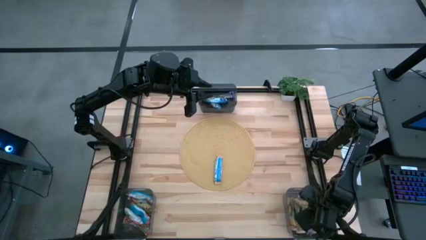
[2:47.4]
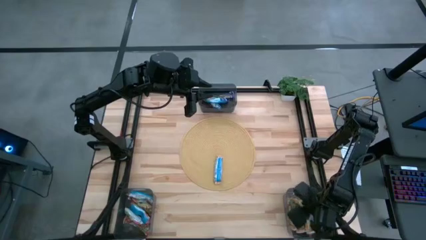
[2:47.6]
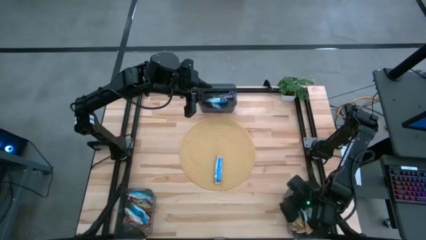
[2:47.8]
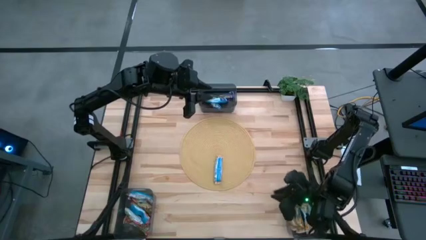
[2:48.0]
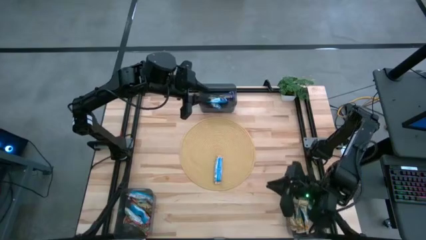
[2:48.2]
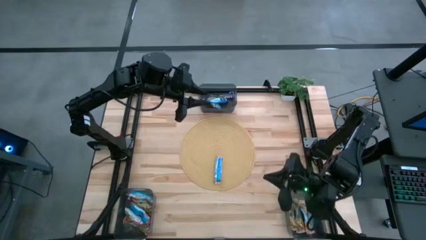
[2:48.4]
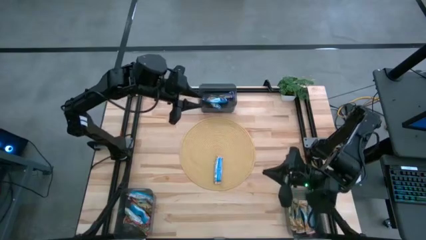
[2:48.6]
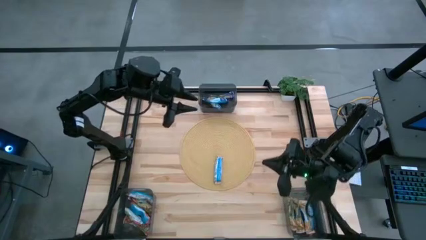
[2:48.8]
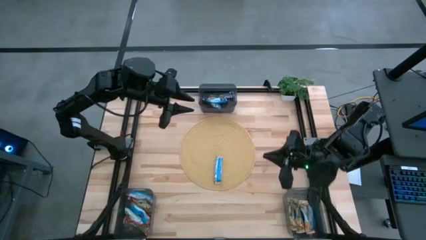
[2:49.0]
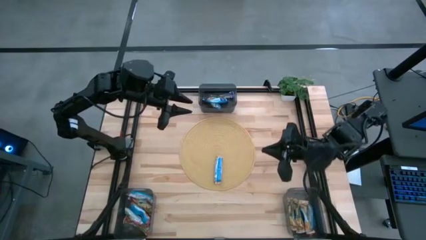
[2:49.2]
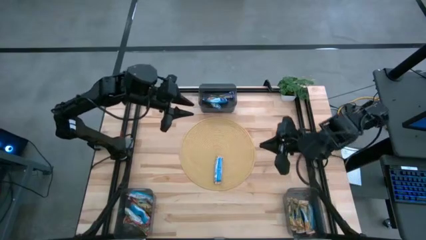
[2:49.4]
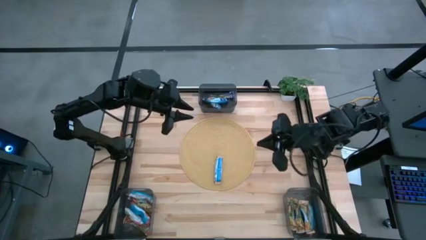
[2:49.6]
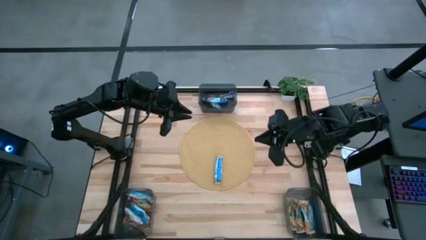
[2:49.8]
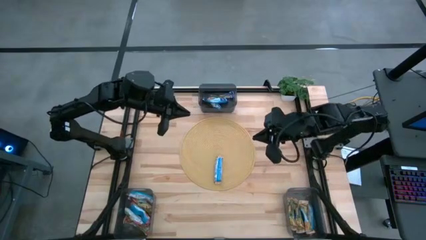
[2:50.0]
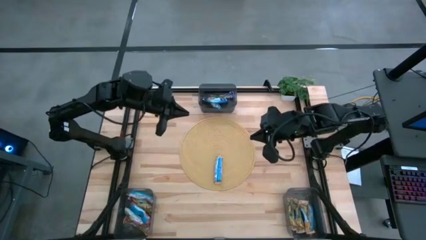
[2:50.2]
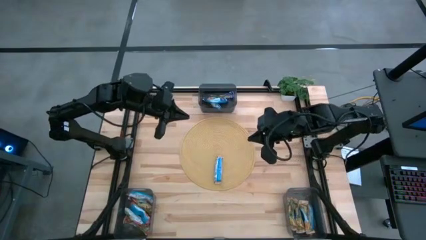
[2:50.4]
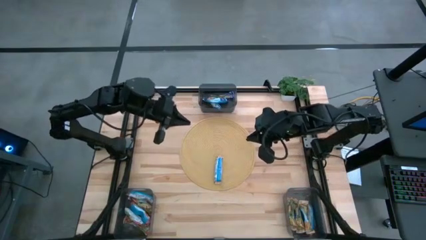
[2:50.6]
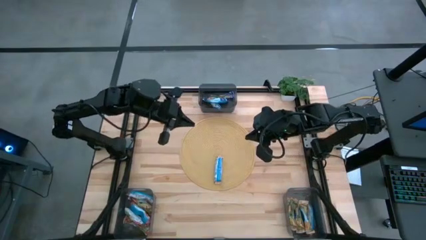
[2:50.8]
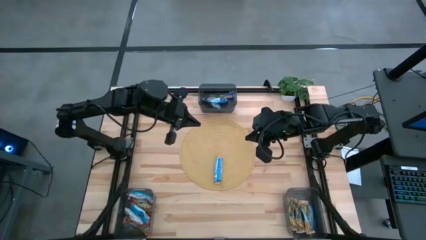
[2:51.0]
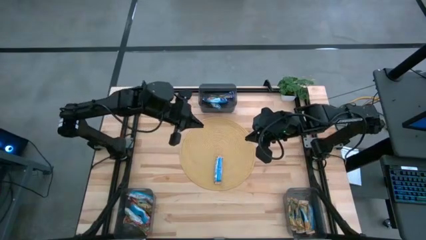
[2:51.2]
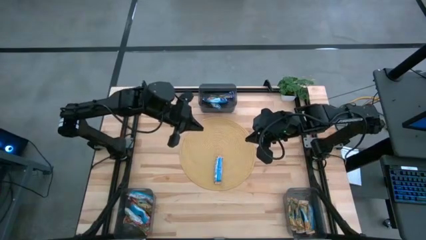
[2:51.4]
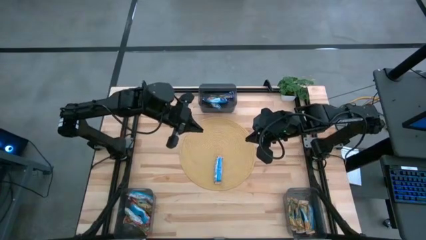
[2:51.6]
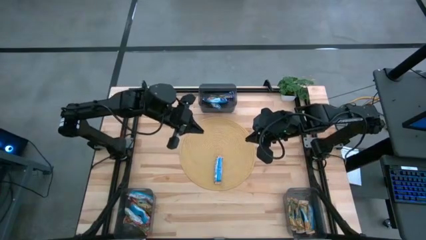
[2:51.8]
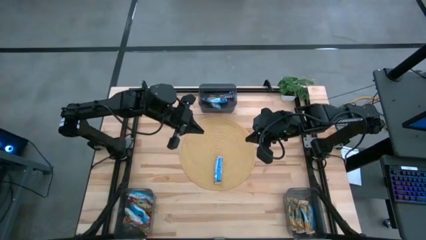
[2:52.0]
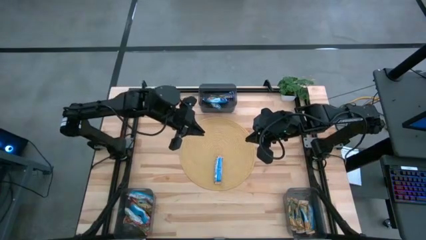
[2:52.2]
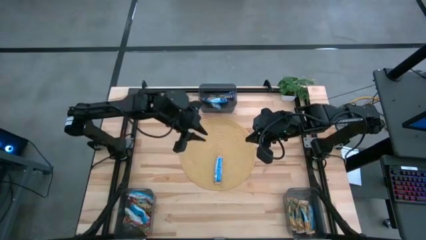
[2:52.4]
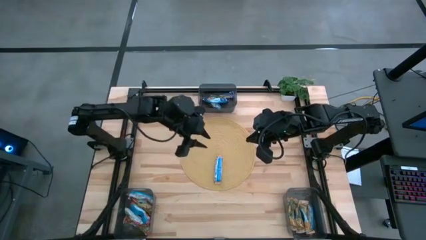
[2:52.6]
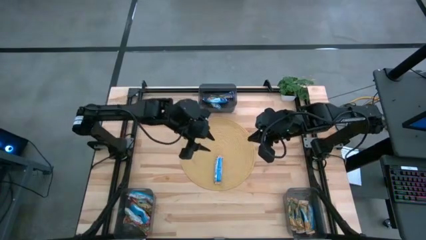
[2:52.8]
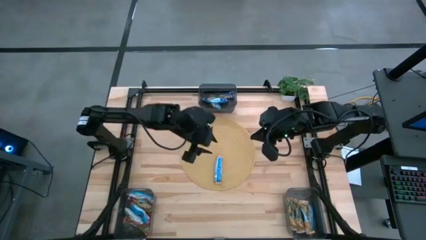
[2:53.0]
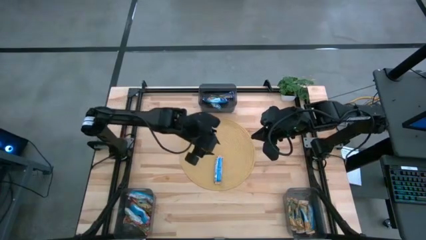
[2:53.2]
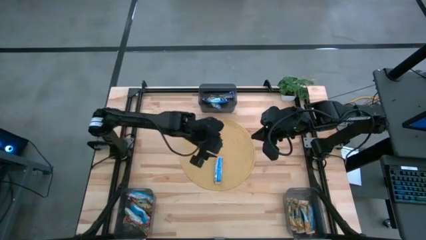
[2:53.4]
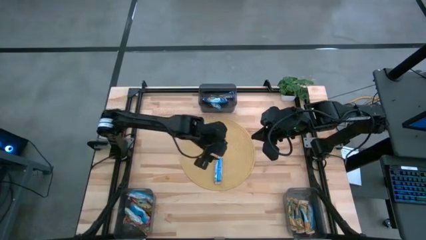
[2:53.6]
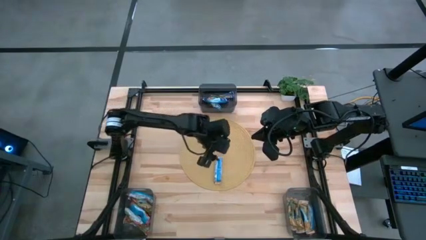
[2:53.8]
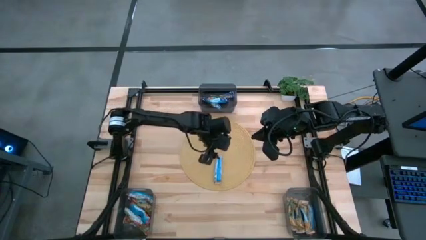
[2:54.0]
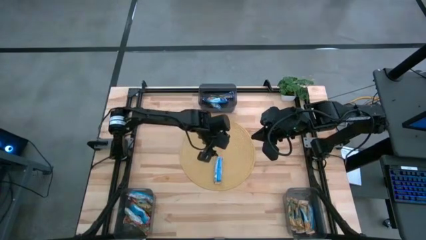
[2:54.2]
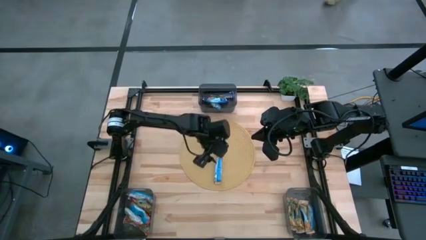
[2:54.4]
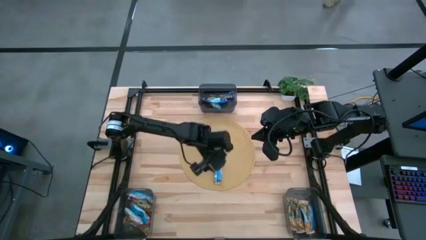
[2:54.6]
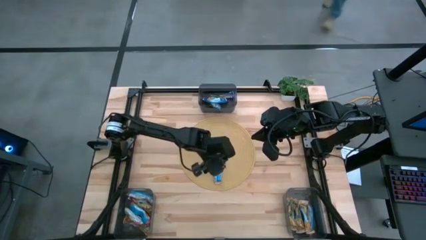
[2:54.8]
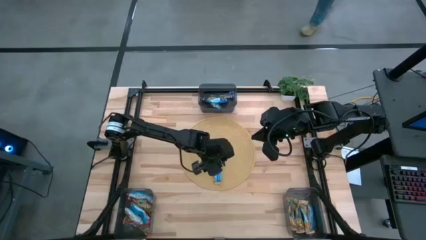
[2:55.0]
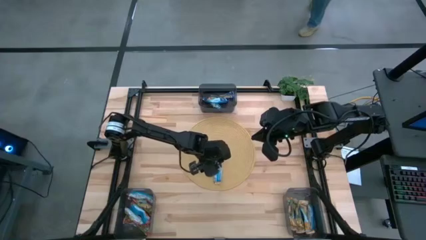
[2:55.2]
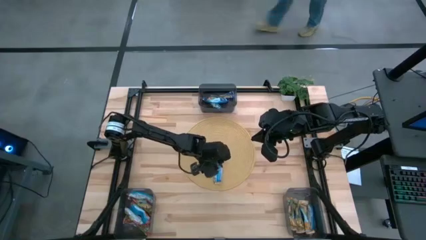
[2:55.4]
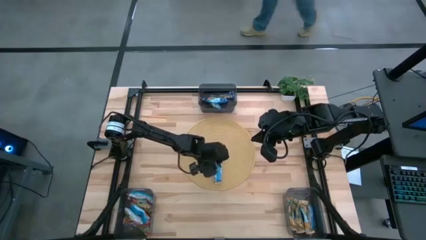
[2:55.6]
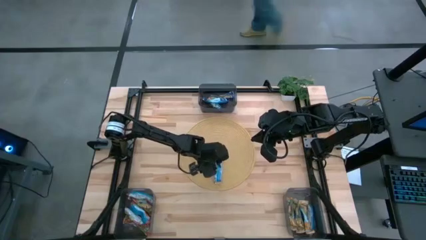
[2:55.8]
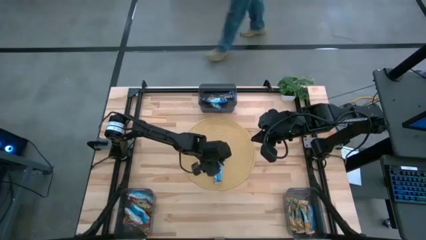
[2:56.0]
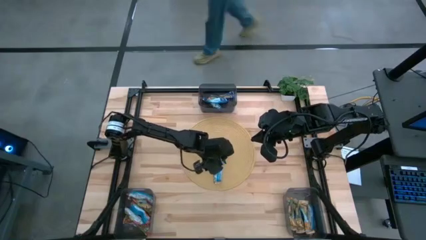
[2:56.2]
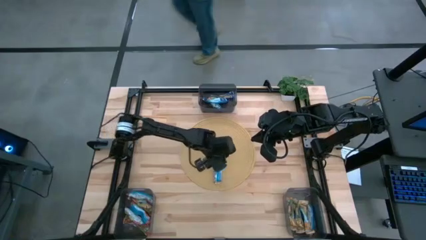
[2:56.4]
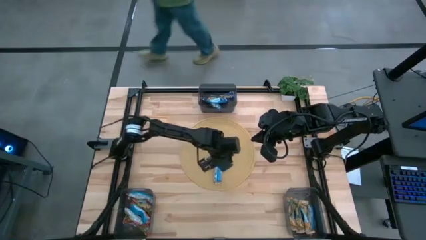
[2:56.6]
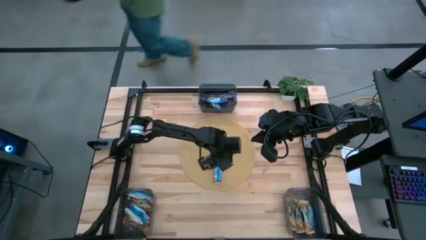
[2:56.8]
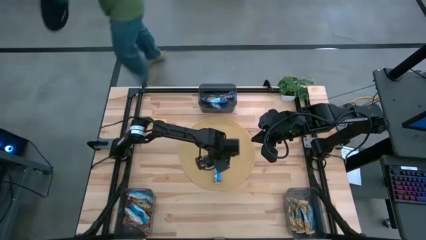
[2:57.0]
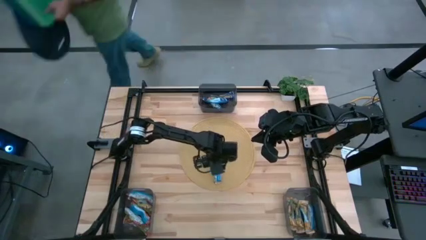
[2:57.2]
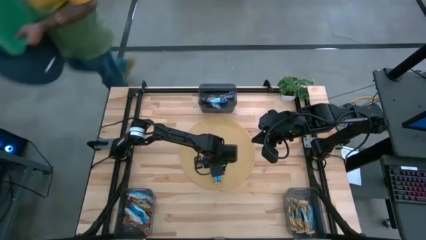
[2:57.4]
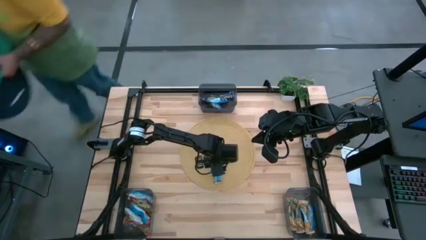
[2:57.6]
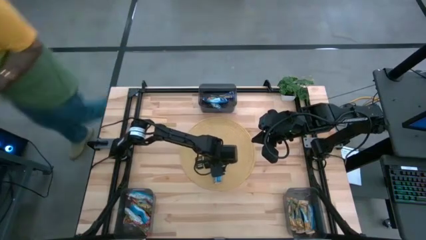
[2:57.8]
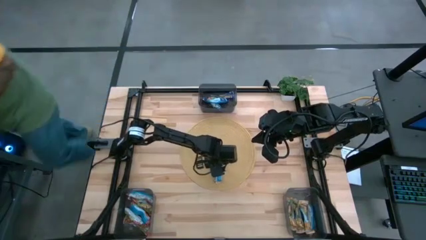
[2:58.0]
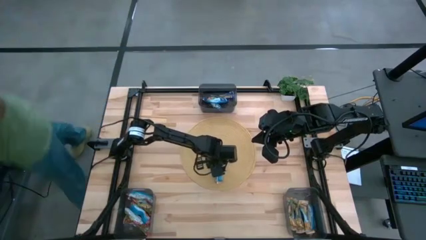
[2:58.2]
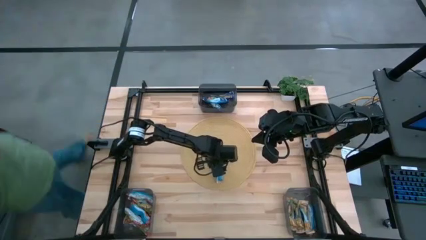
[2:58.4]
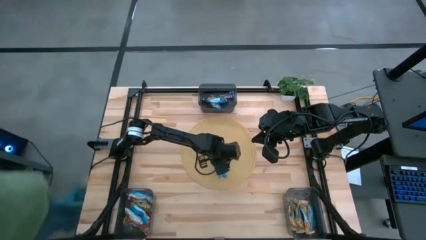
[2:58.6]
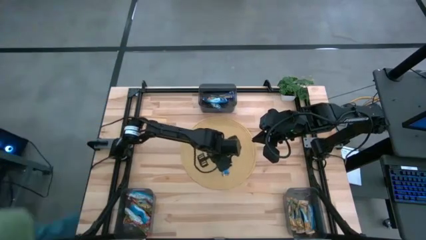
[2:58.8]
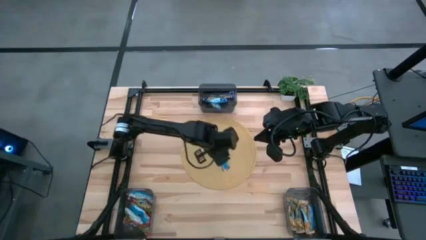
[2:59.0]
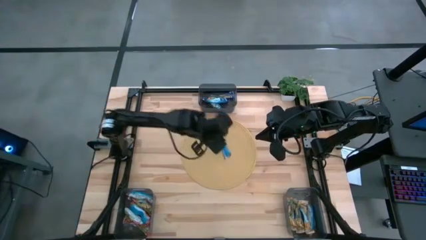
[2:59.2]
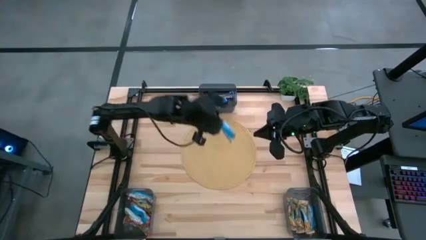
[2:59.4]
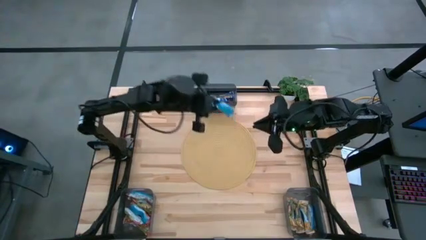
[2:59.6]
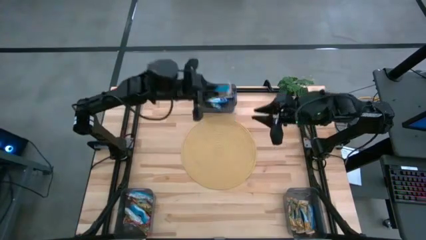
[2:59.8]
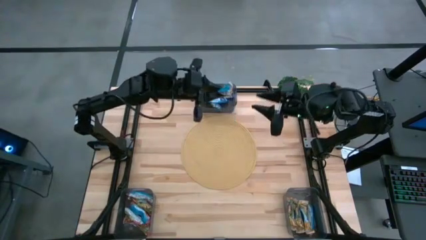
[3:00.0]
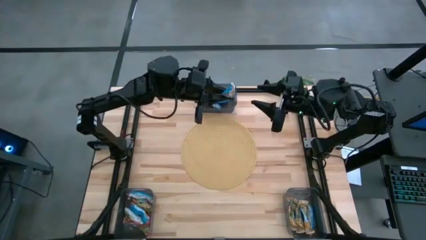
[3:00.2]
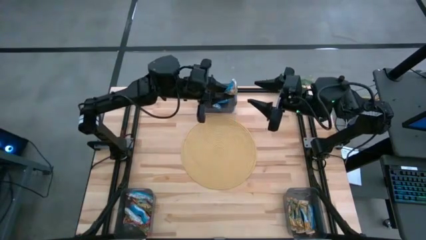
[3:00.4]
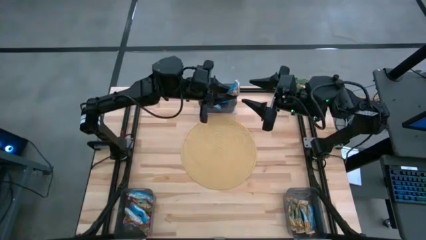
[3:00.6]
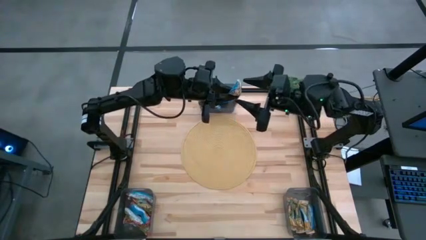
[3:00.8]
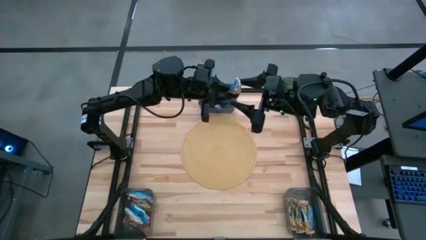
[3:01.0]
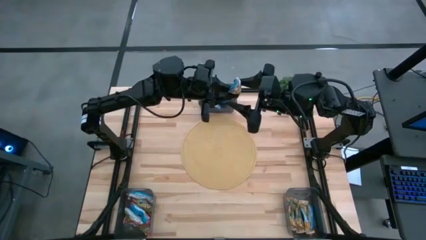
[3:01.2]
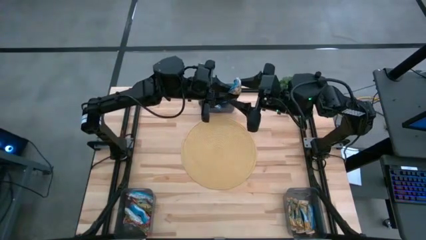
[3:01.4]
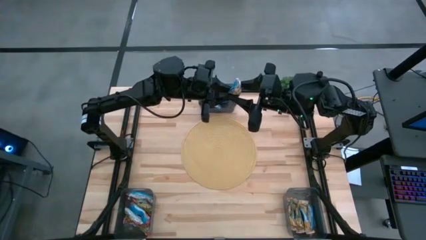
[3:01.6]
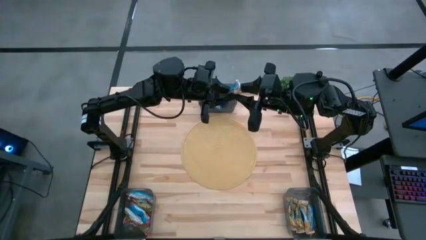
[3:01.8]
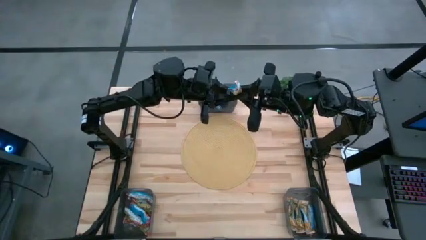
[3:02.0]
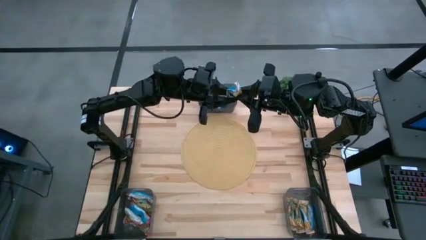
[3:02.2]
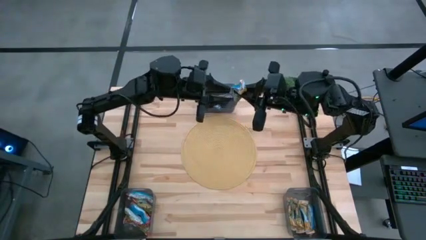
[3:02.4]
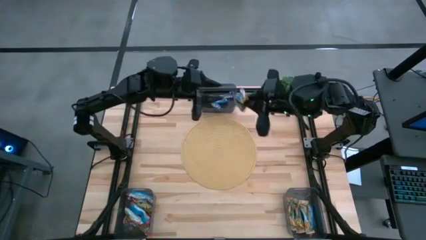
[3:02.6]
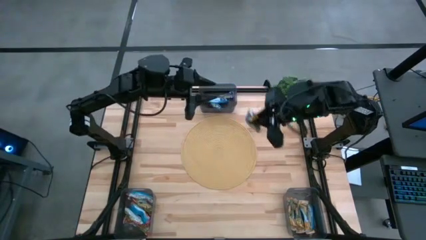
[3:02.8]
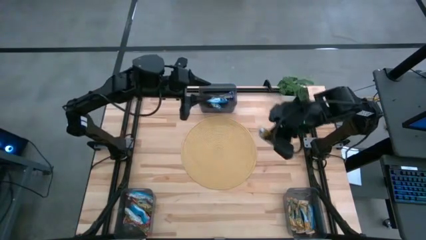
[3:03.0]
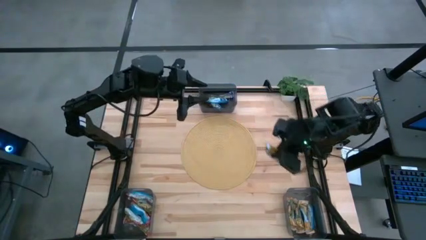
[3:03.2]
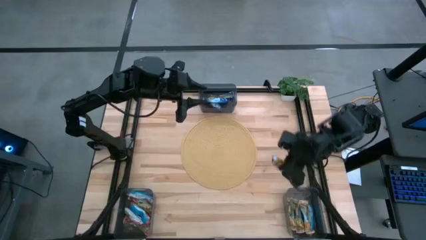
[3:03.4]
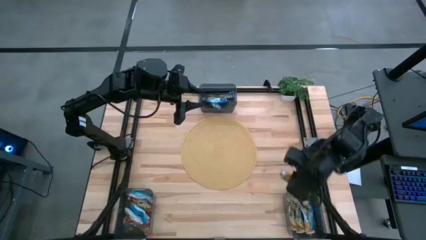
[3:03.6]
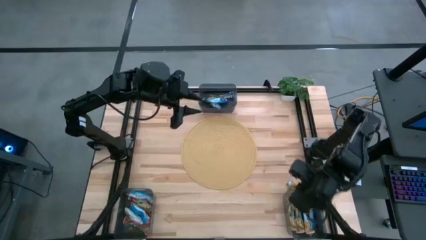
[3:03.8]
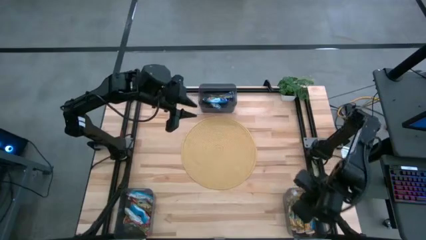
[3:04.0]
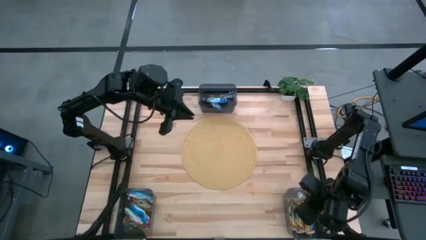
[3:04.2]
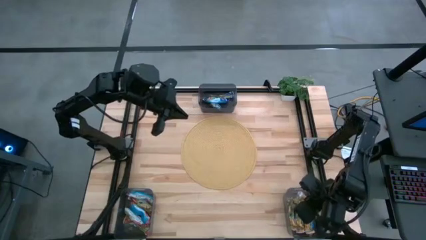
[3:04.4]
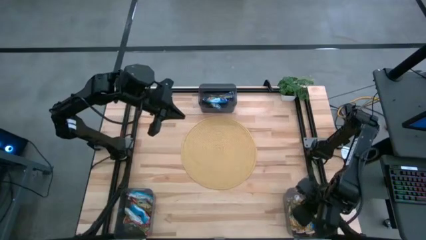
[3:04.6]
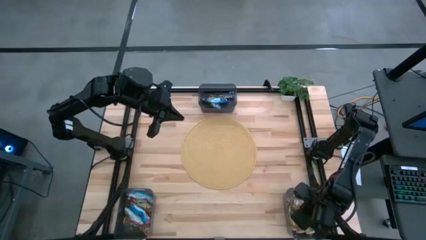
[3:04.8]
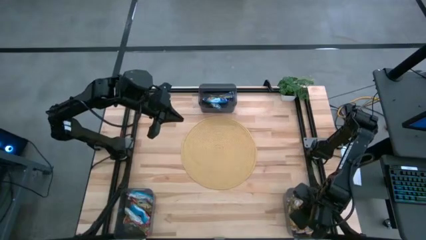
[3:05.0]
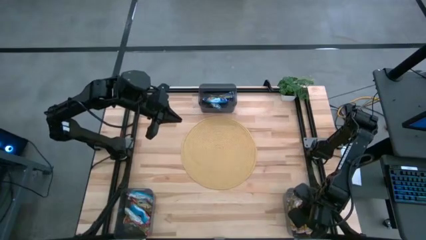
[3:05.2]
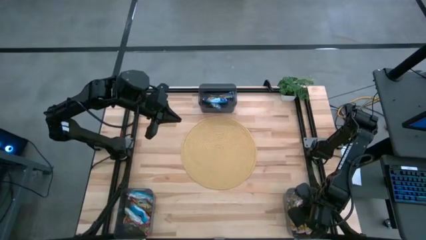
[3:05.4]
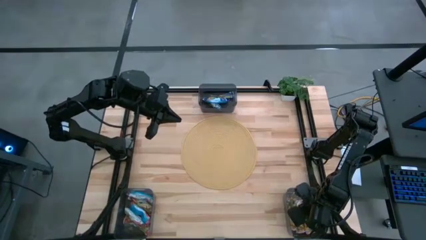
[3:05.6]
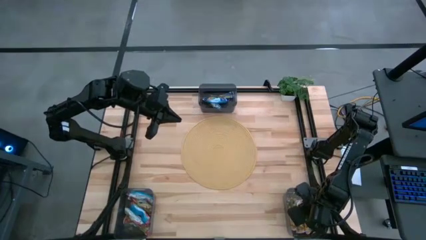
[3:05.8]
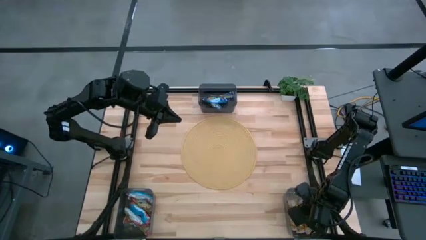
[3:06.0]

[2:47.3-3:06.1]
Task: Pick and place Granola Bars by type
Put the yellow granola bar into the right black bin
